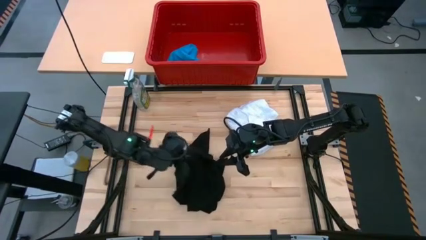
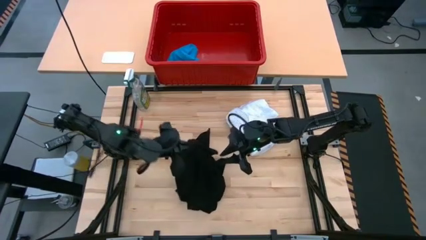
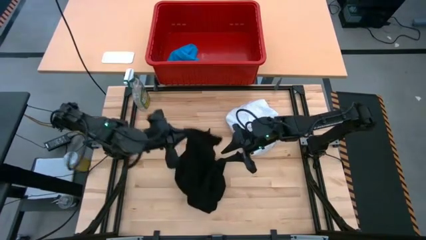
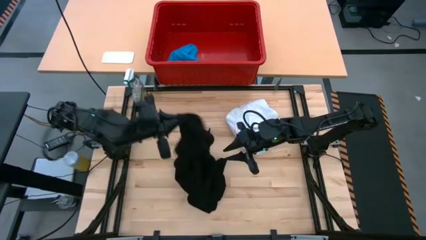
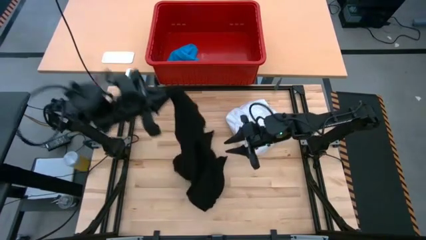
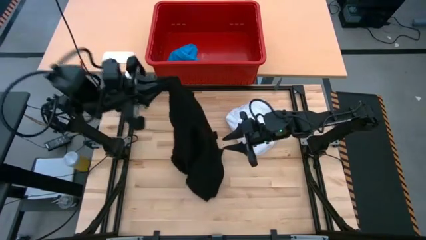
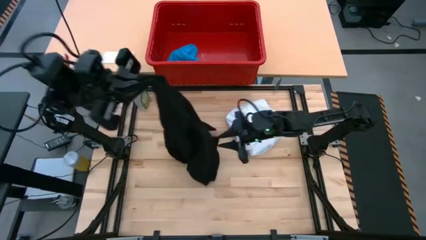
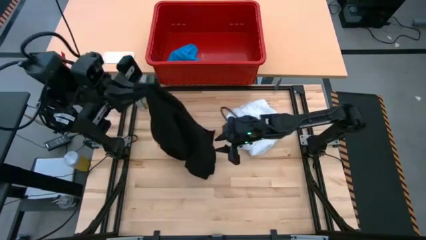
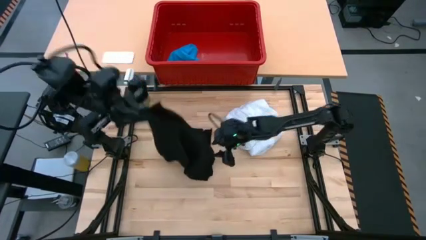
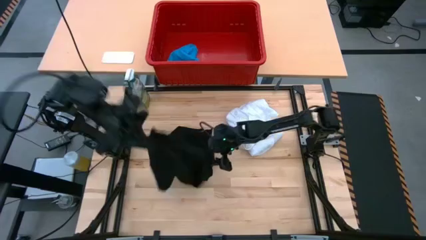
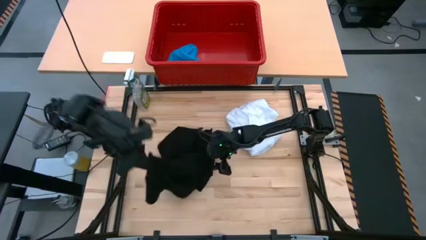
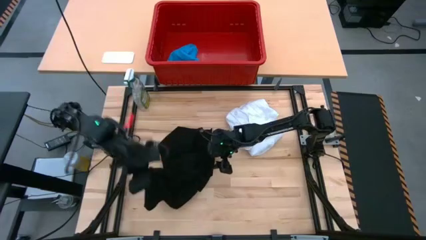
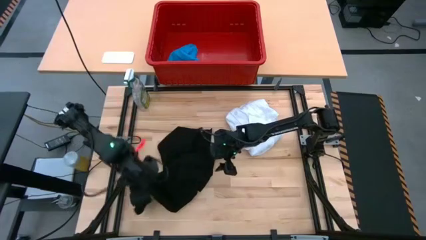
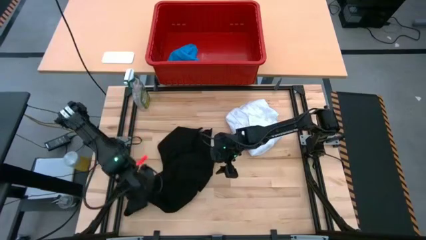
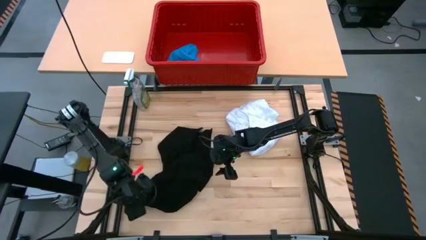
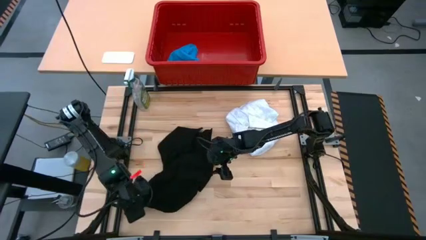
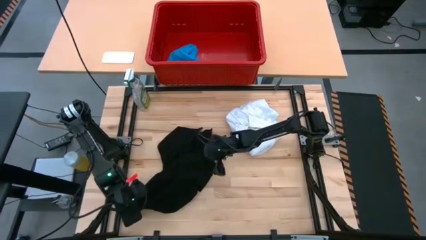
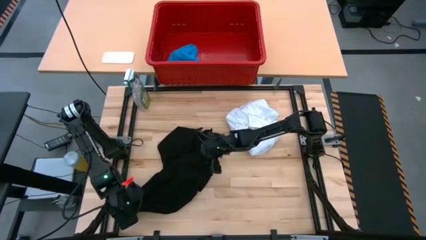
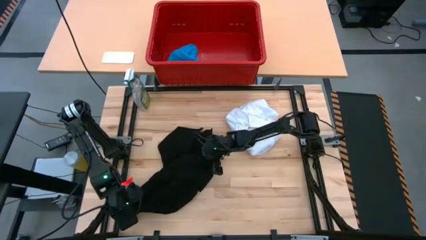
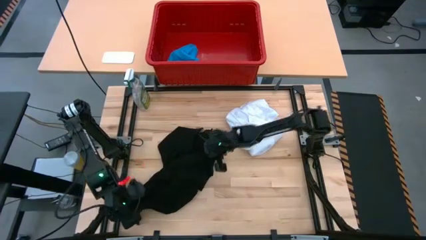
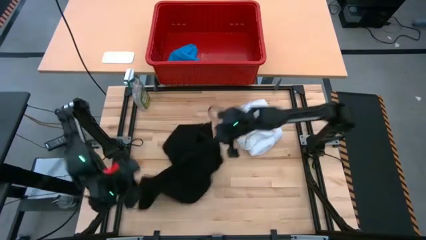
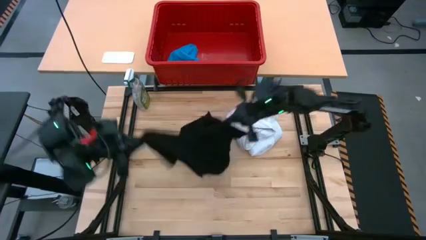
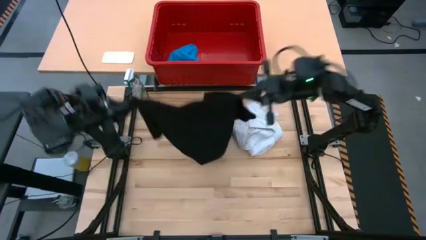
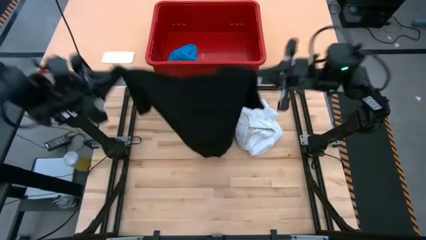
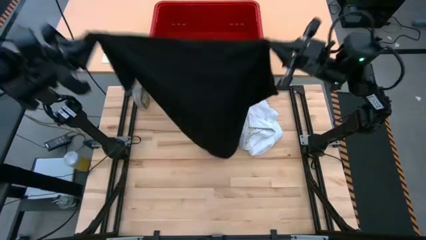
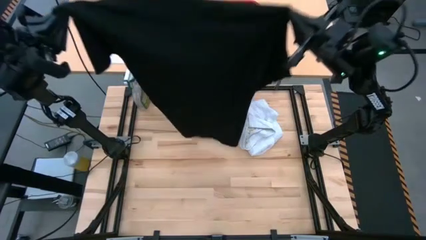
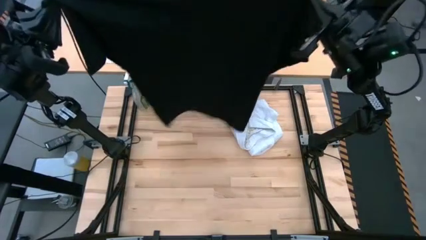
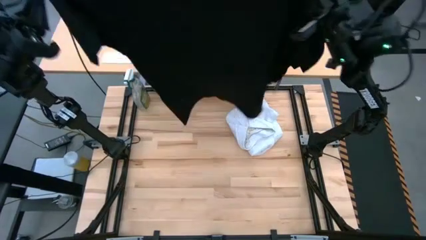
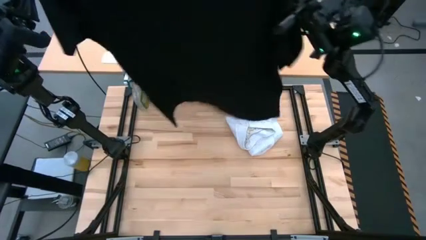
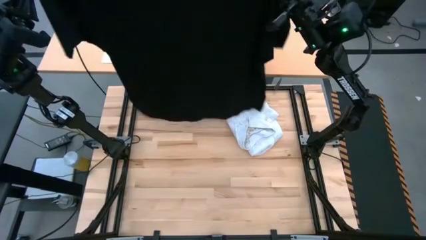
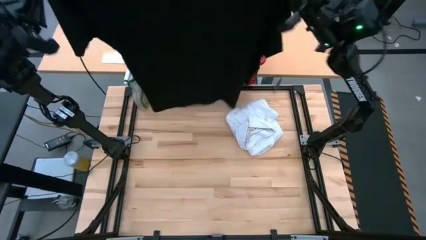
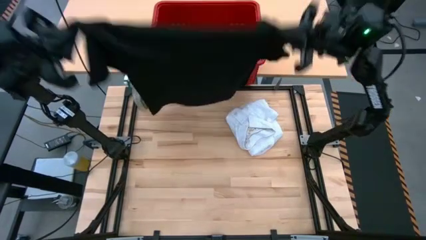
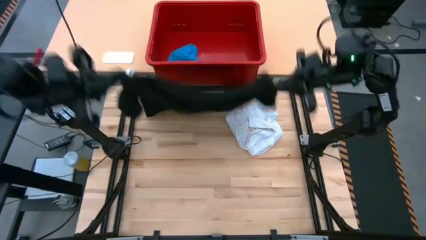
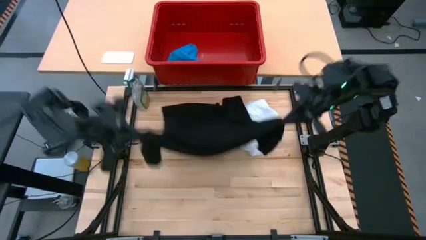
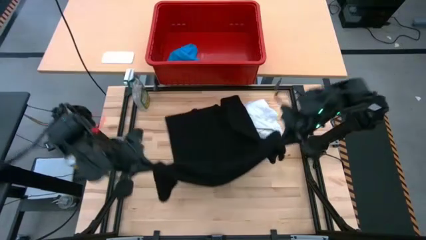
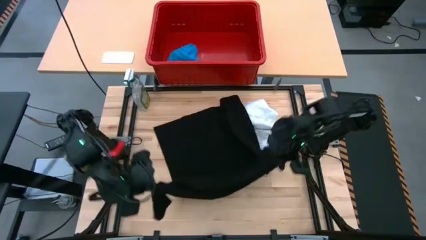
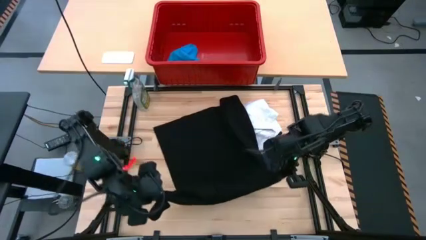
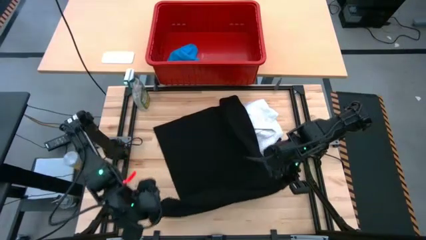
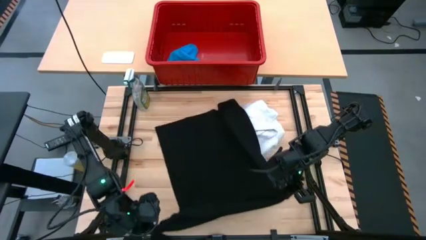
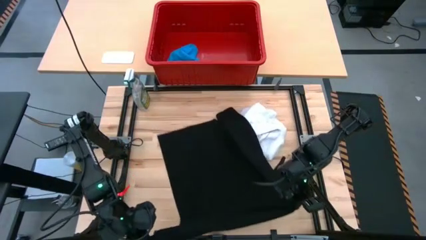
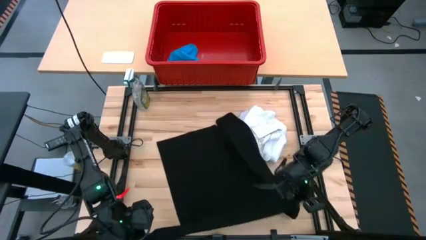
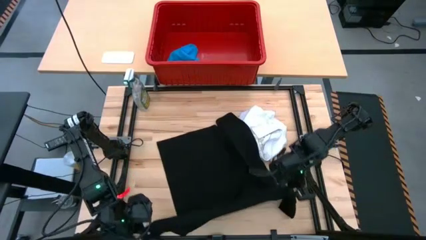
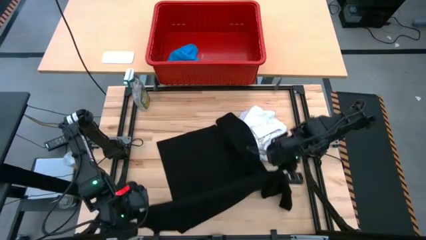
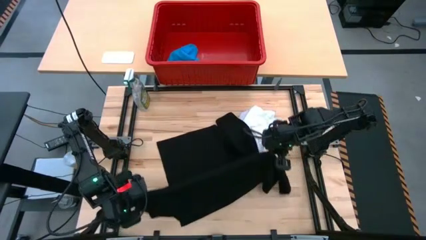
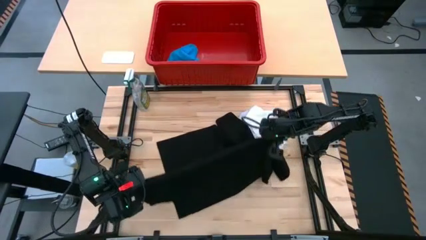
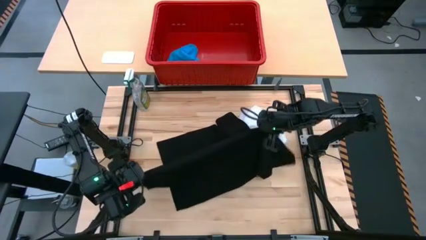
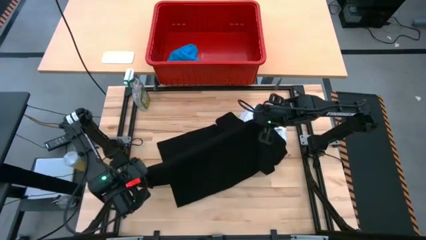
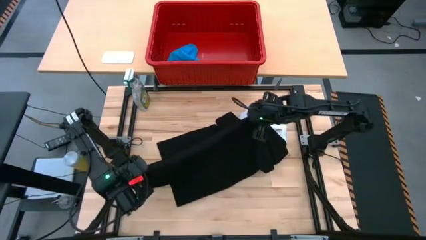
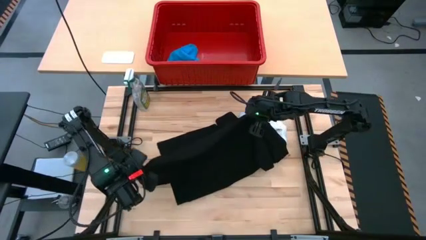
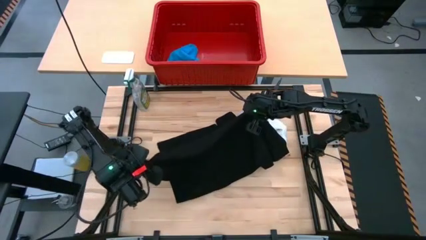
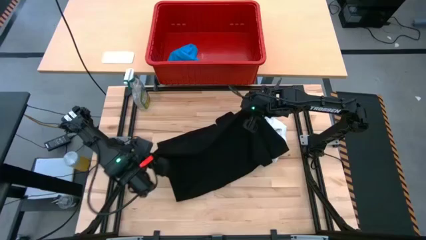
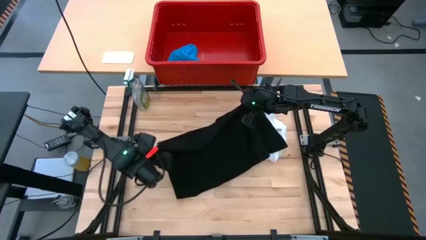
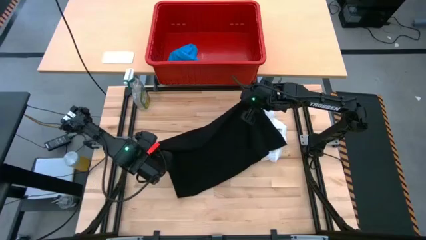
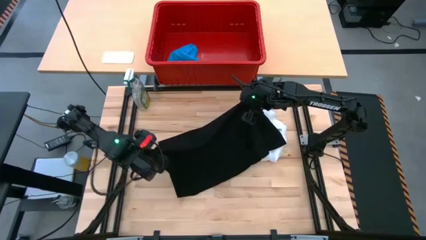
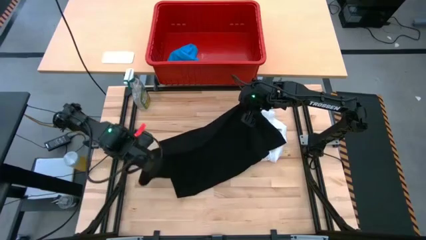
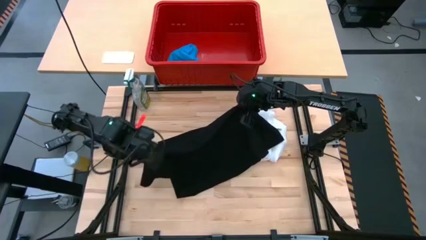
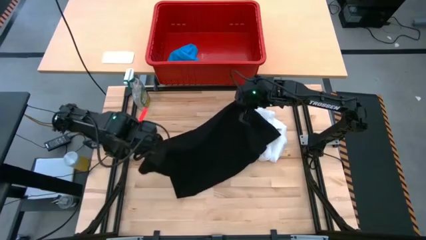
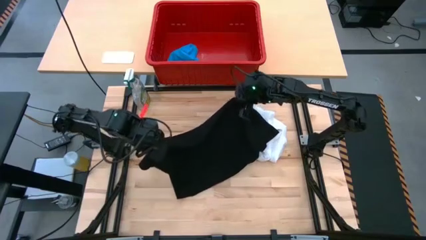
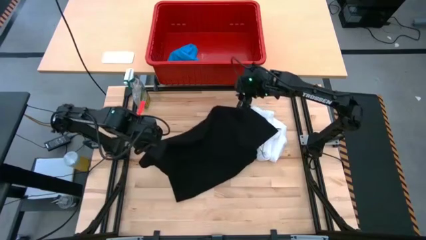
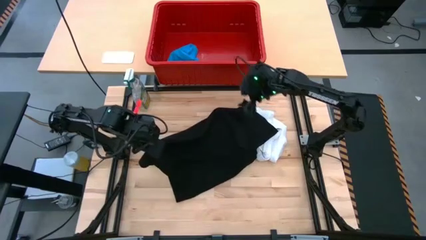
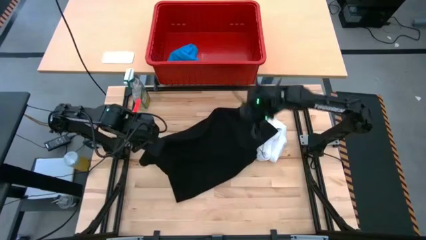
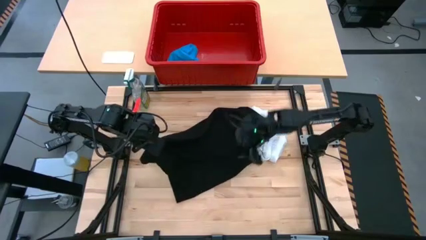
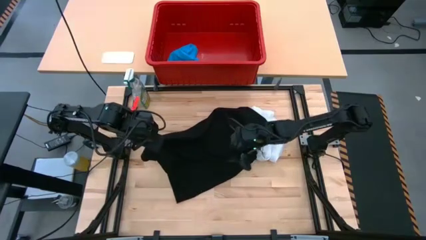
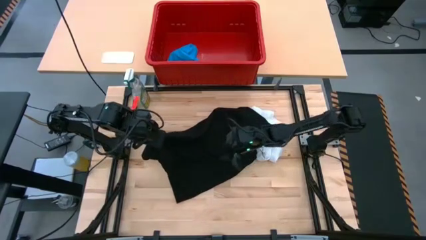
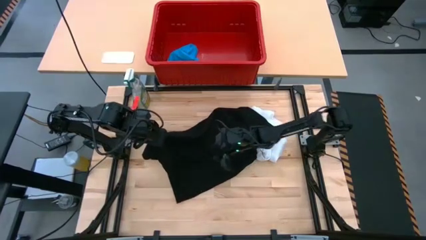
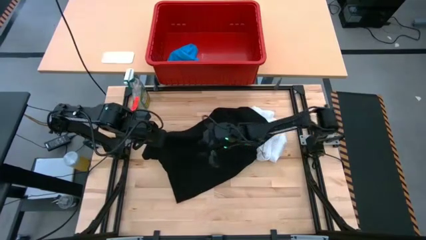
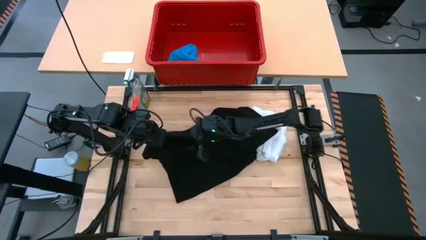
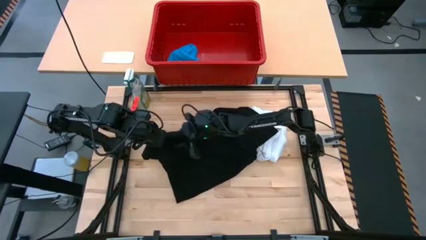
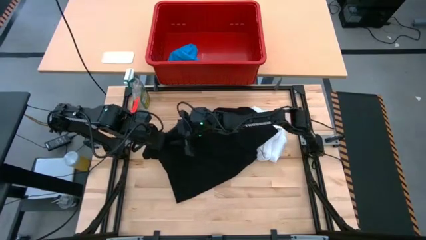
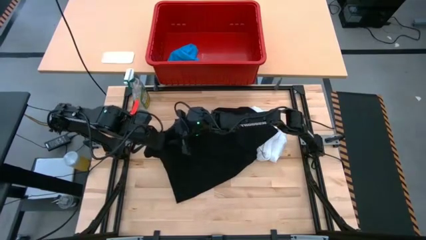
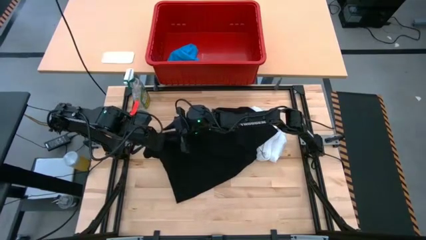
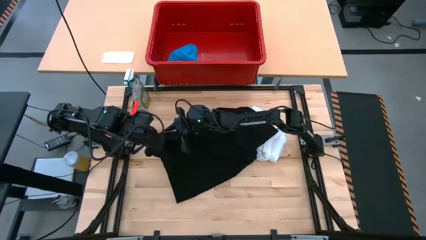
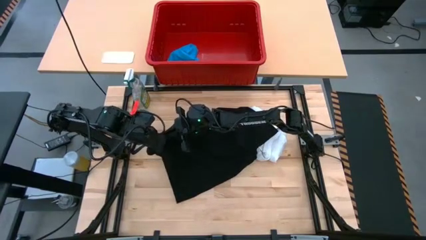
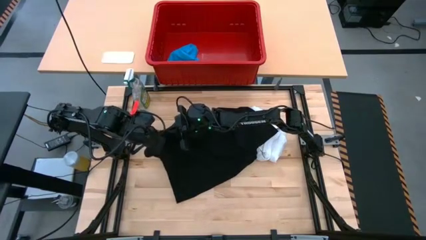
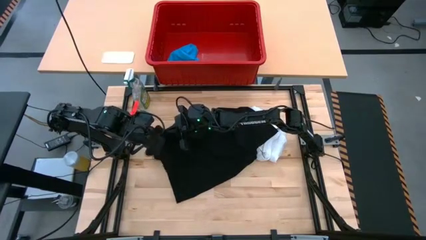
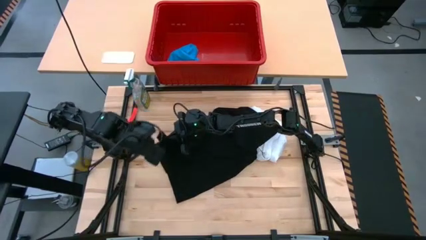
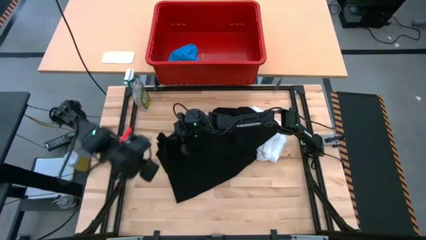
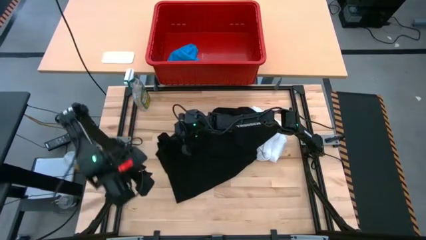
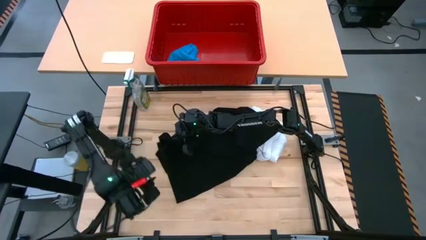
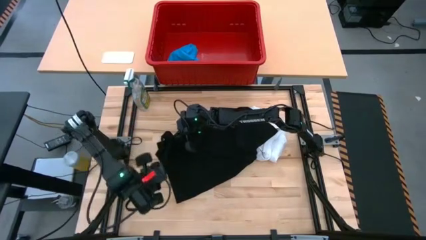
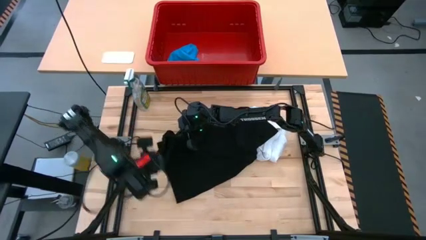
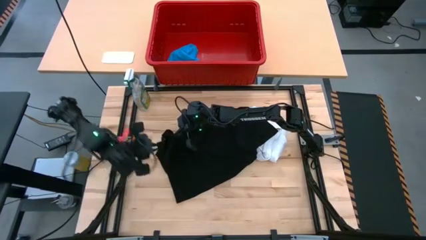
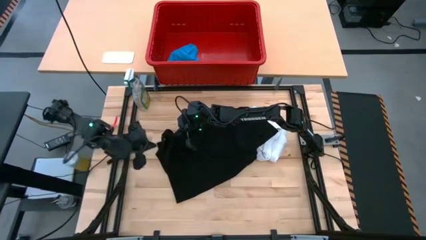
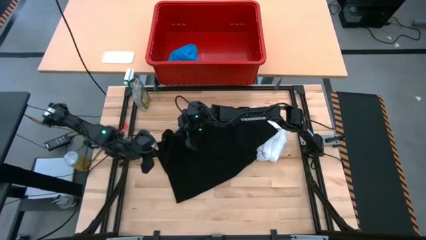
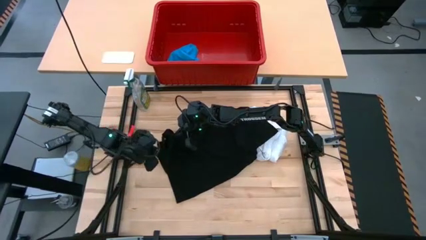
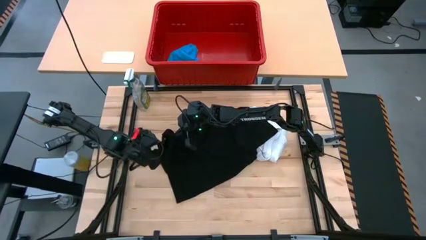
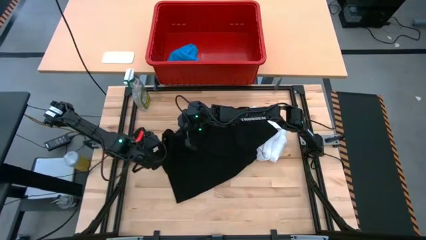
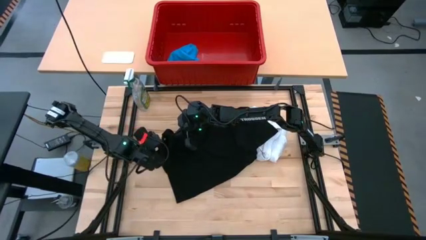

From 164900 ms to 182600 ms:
Task: Fold laundry
Fold the black shirt
